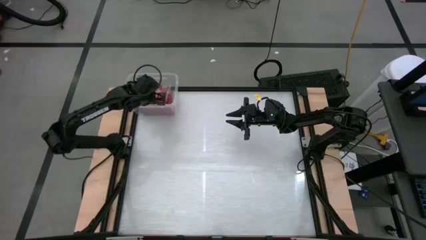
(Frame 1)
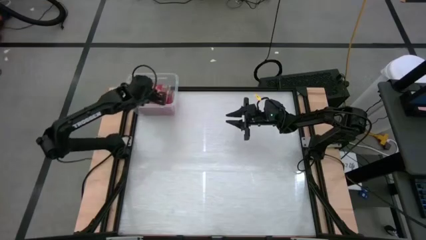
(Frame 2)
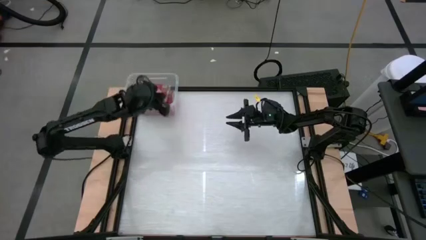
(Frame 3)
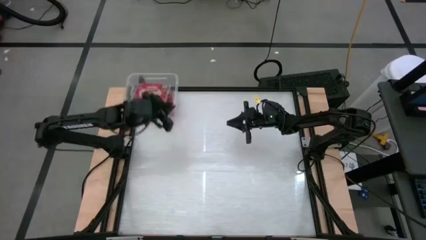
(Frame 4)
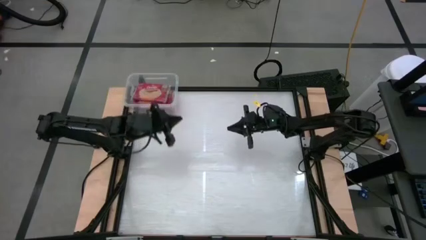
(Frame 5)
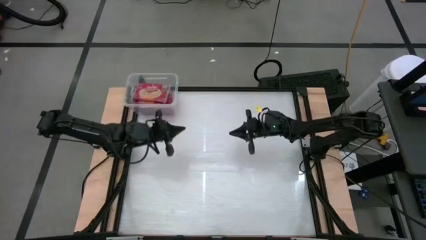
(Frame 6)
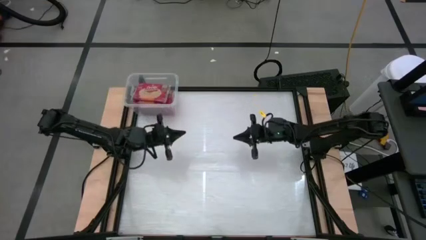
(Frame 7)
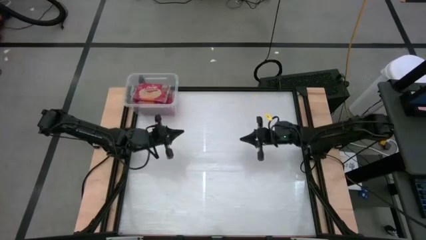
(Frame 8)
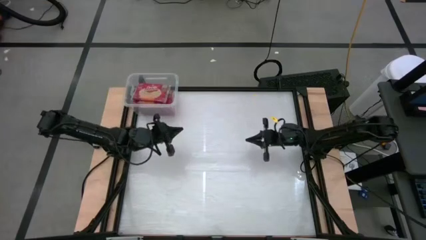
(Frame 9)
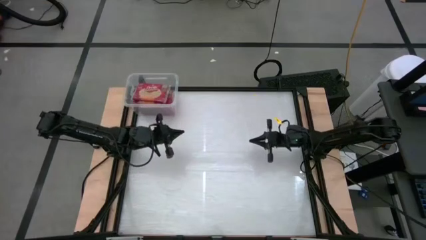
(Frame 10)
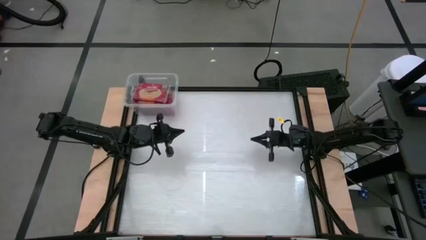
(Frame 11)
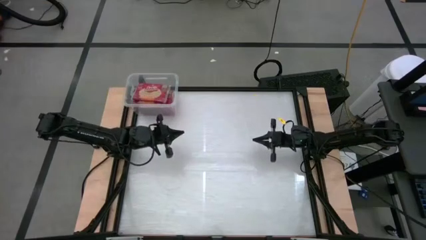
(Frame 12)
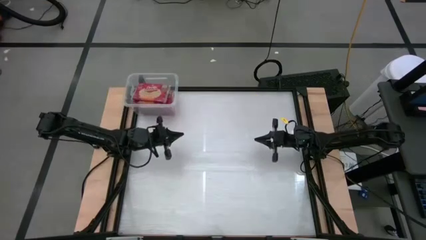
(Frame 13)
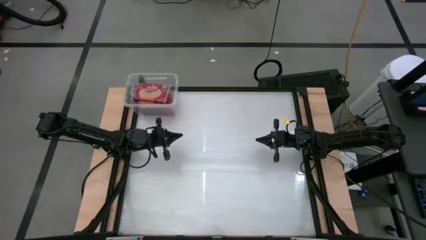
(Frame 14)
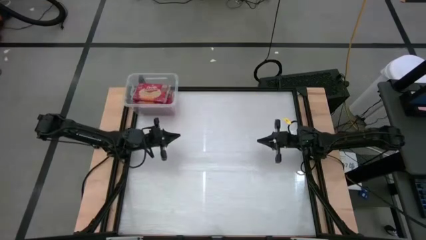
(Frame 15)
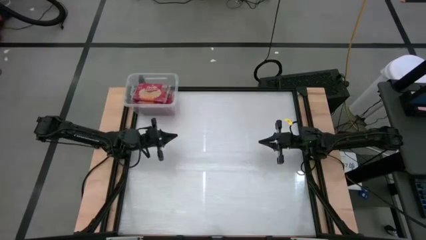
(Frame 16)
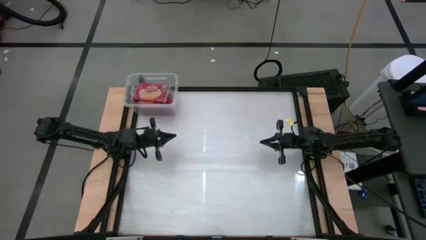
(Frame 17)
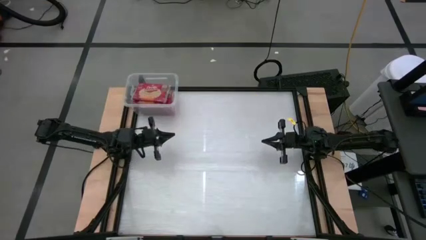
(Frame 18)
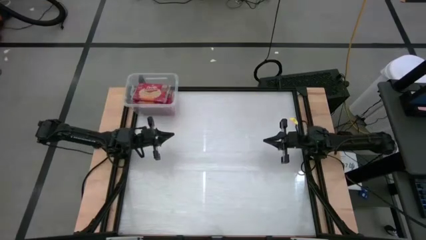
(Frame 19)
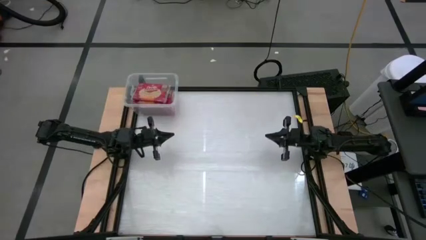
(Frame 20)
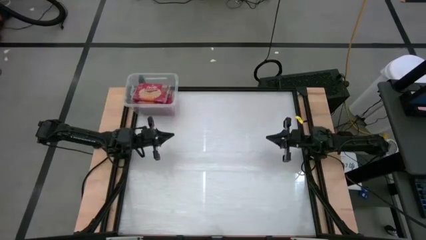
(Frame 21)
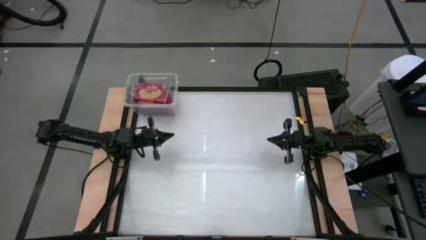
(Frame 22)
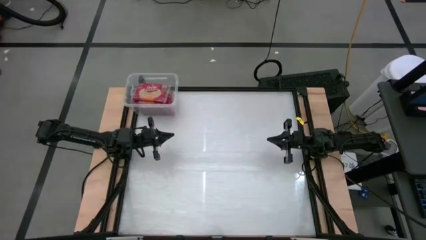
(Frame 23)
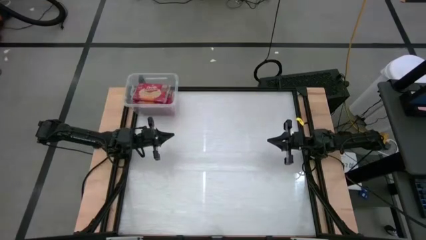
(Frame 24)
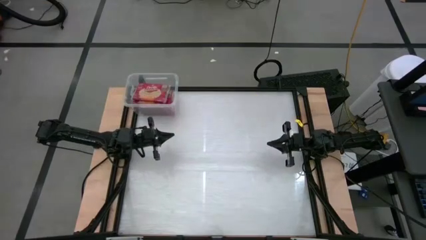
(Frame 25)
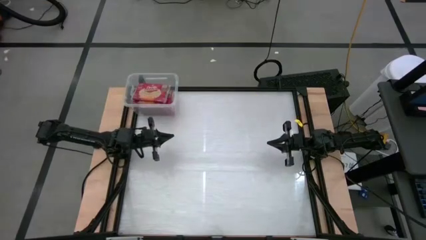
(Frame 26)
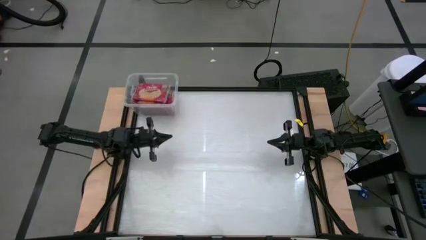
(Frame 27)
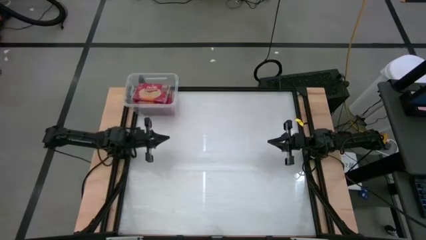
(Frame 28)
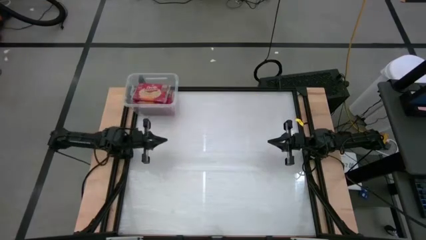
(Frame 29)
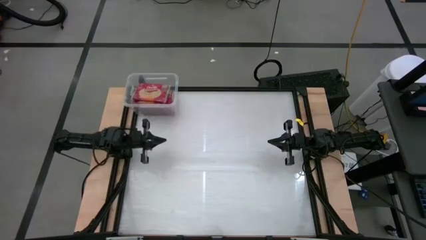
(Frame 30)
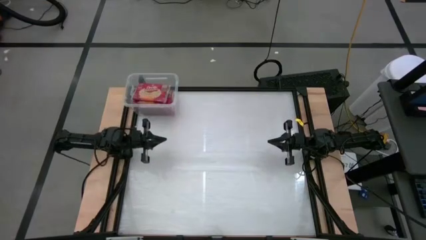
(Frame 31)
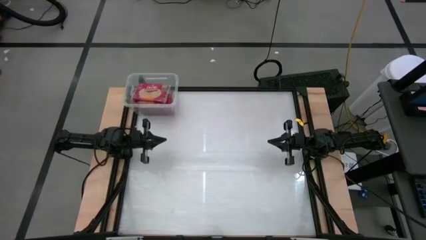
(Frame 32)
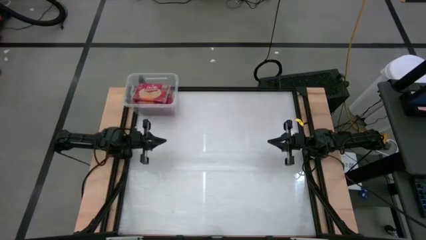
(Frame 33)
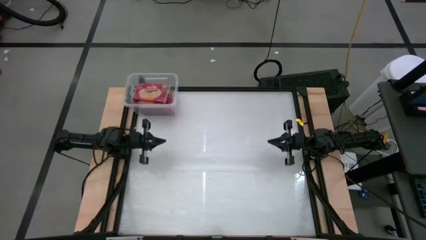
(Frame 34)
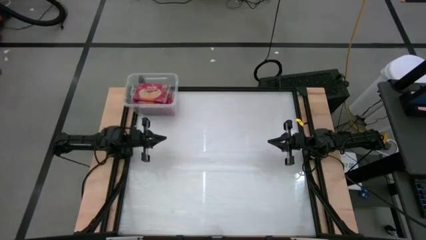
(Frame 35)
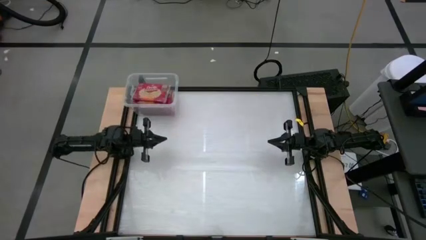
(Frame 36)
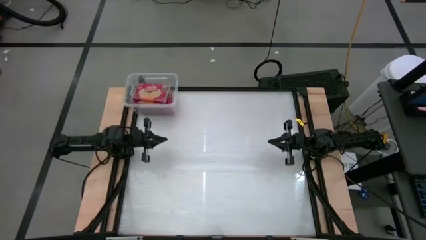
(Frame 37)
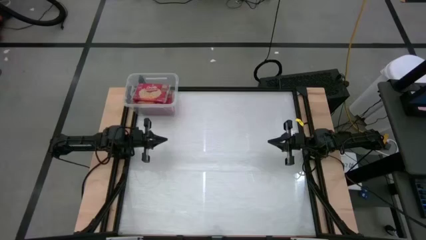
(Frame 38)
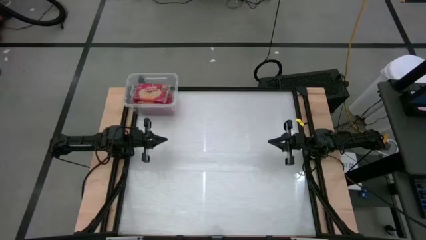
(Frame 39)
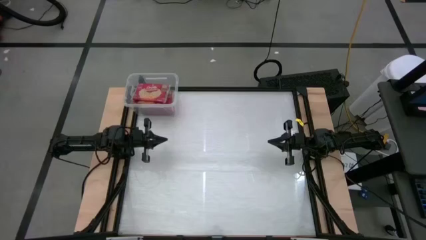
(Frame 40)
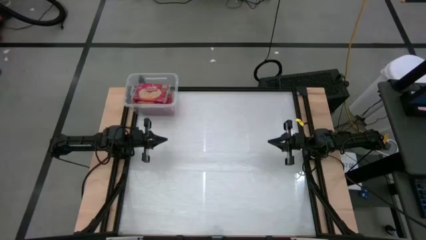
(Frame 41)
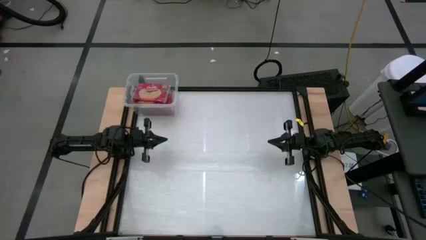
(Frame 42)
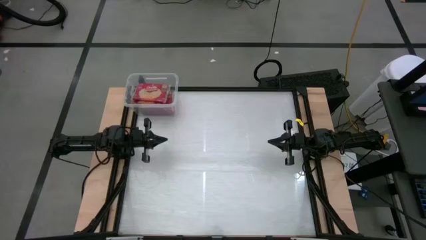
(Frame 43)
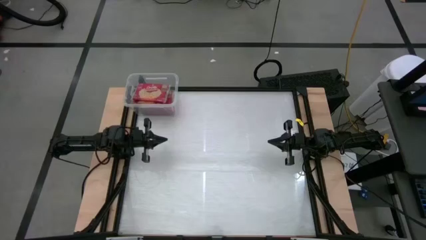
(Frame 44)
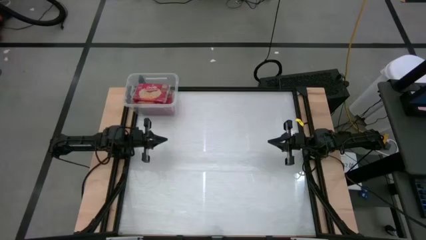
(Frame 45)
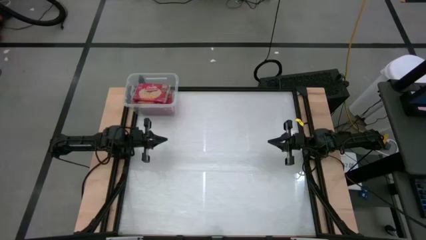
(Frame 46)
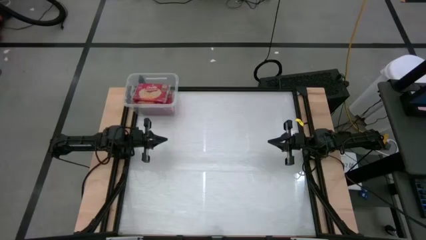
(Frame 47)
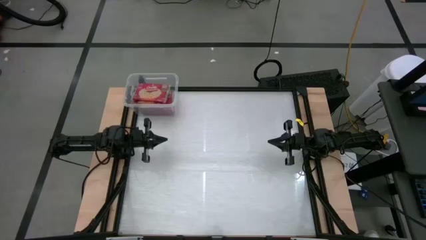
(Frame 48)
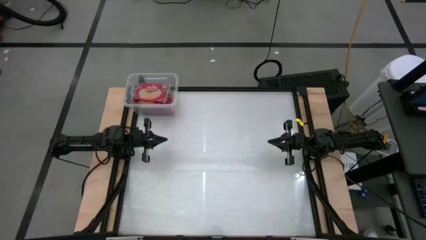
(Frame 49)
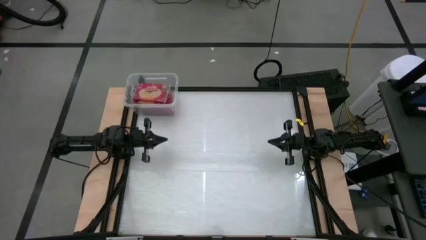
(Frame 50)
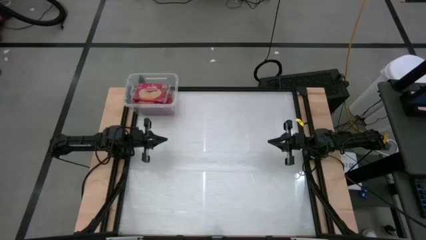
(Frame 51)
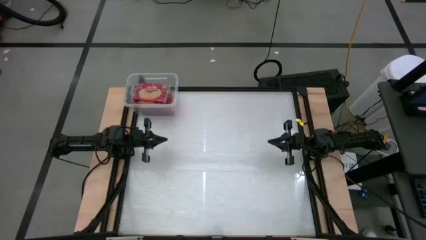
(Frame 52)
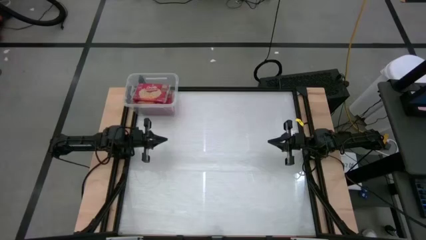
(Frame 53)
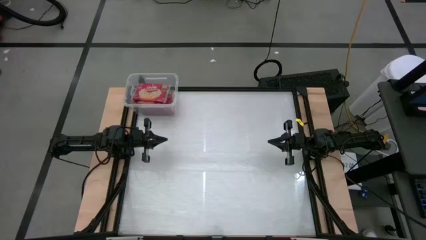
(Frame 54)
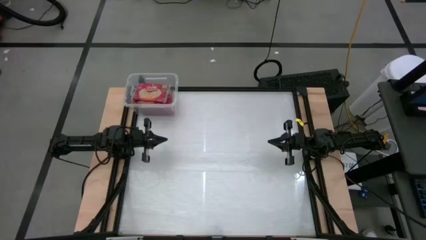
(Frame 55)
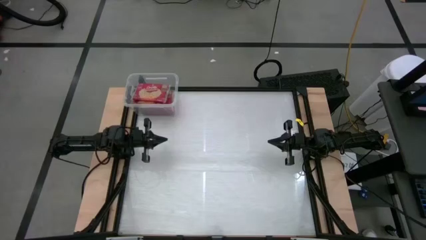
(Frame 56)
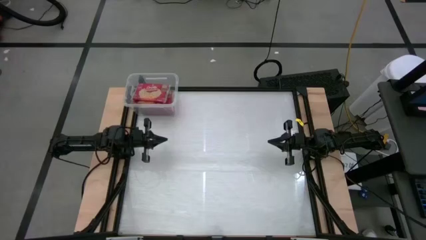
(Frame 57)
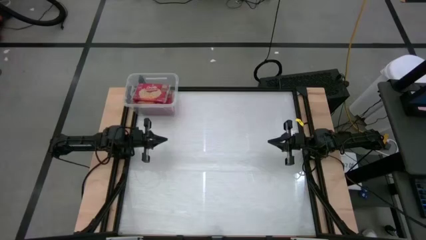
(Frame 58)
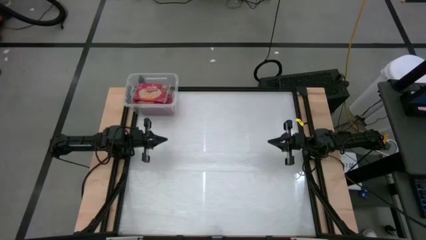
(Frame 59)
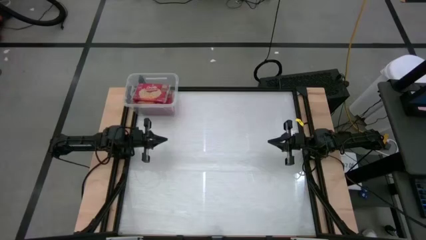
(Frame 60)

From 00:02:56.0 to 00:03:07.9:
Task: Sort popcorn bags into baskets
Return to Home Position

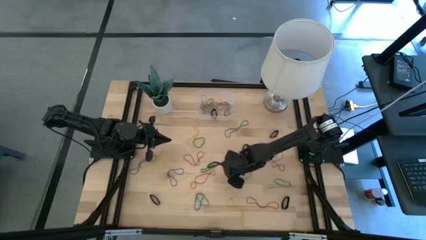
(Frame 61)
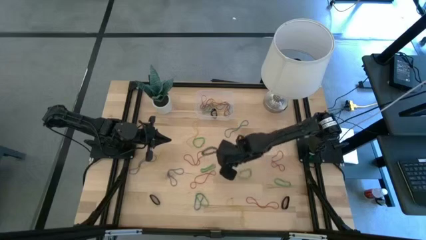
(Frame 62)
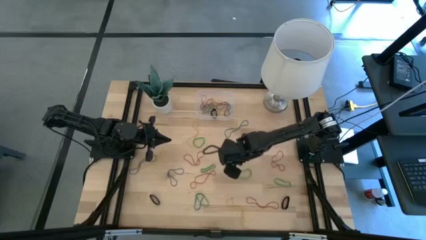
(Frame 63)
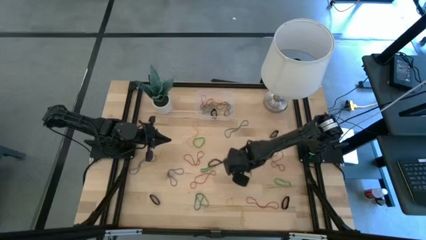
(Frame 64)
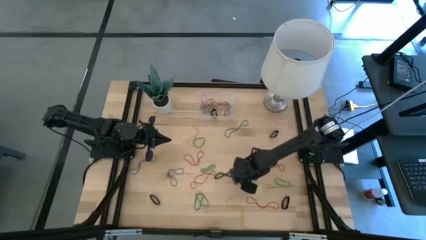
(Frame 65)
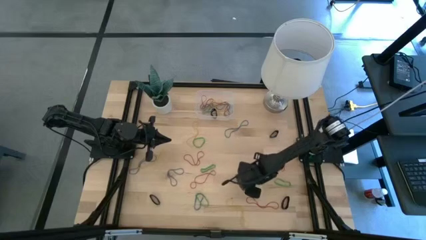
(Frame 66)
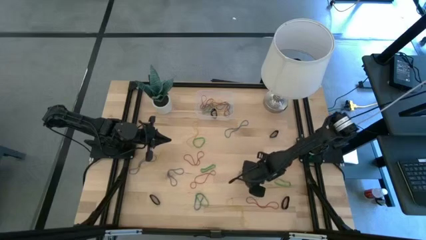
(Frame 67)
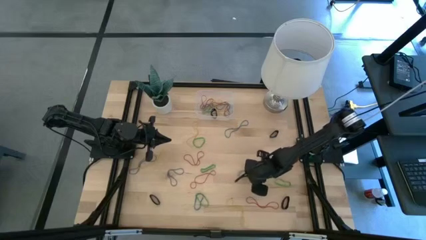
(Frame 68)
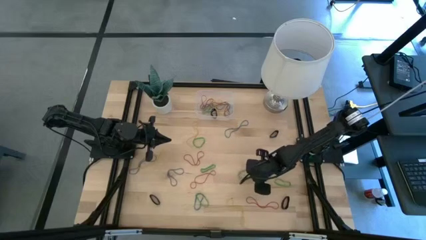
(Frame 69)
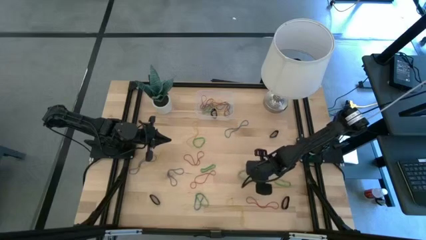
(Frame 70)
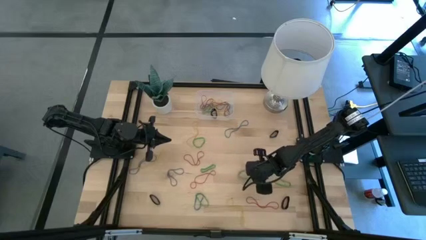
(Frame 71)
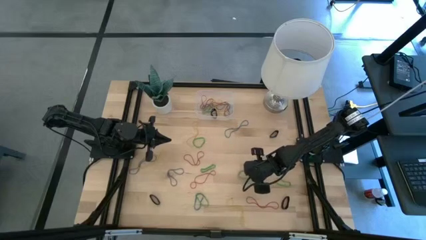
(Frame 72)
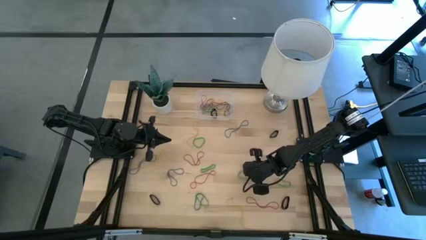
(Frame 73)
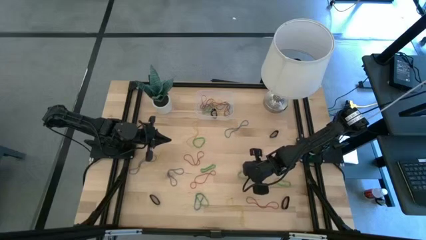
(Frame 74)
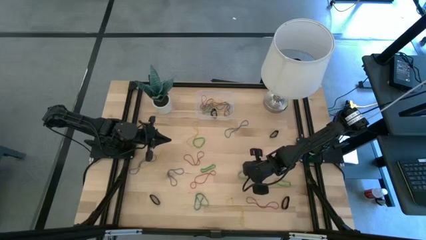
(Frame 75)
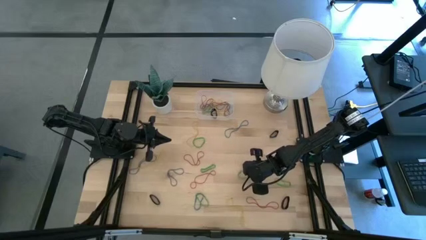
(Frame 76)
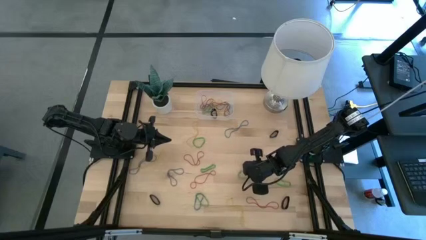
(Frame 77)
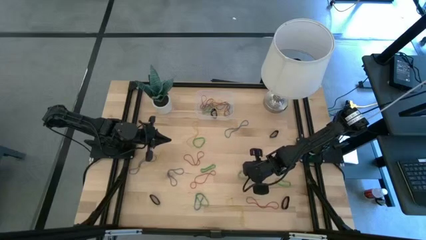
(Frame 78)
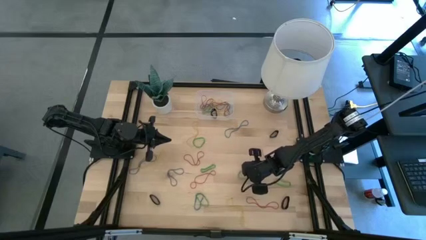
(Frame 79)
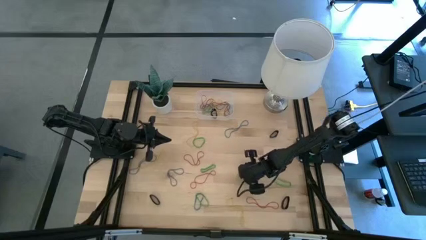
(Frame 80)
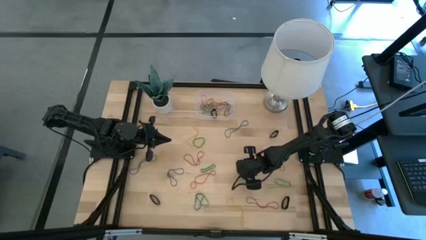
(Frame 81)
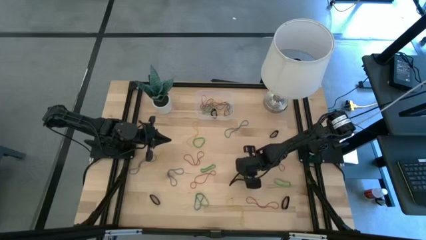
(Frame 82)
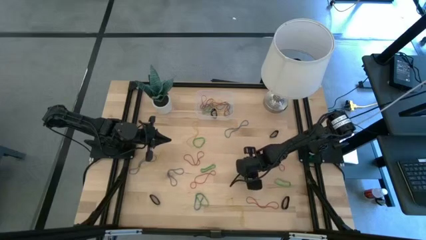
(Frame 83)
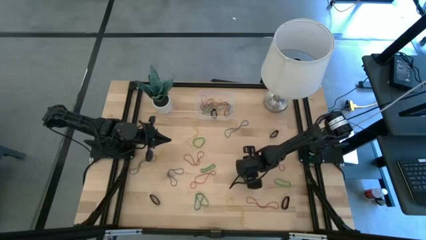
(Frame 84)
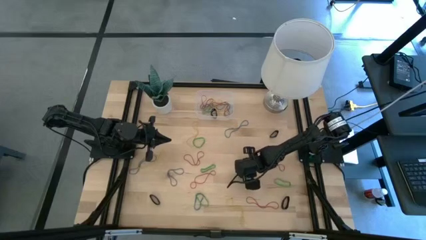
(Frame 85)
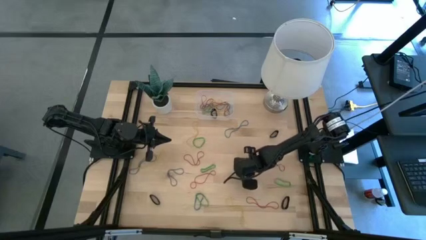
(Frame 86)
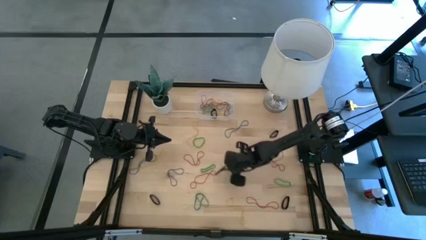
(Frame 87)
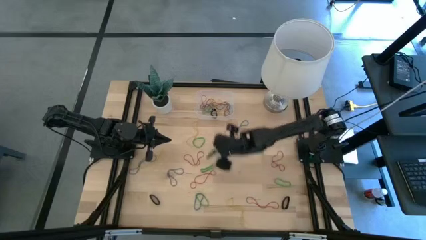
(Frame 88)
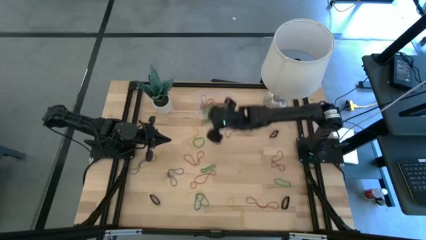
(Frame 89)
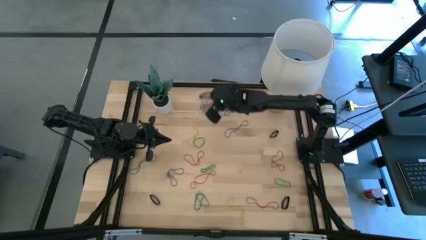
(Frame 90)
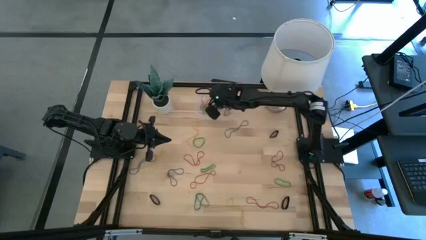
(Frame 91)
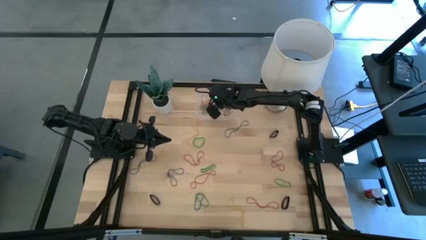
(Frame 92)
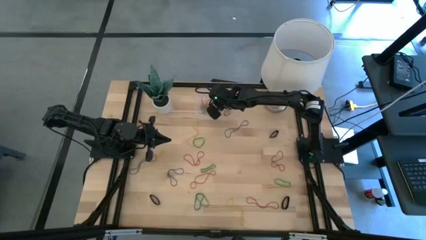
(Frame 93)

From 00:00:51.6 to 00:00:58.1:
Task: Pick and place rubber bands into bin
Put the green rubber band into the transparent bin
